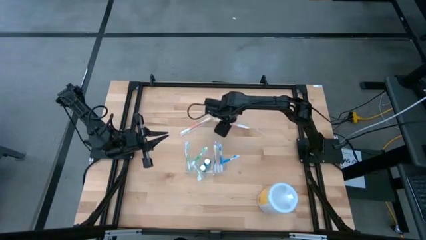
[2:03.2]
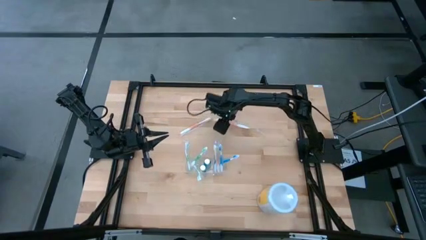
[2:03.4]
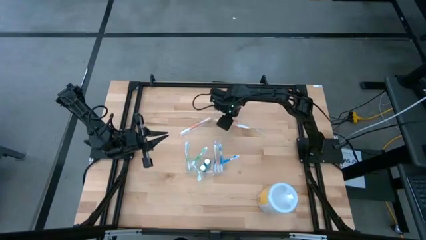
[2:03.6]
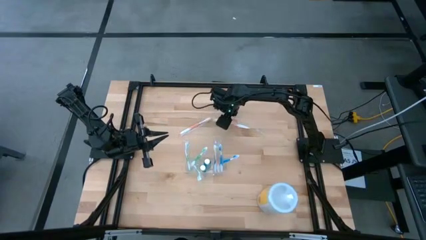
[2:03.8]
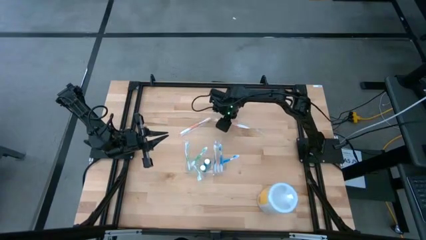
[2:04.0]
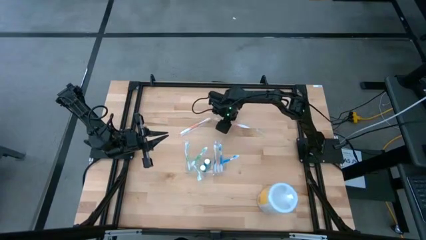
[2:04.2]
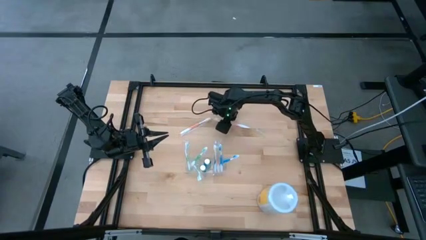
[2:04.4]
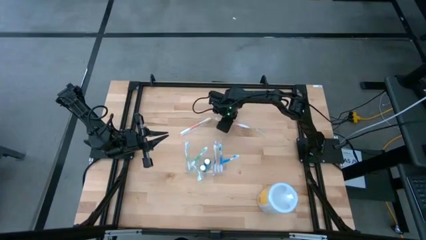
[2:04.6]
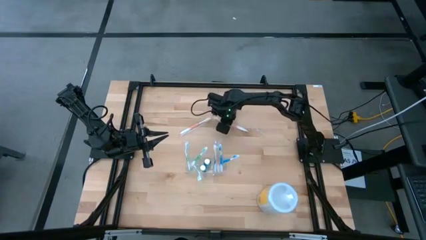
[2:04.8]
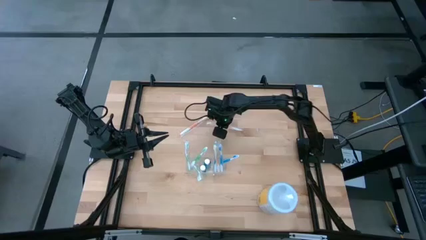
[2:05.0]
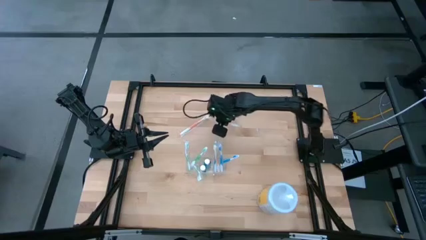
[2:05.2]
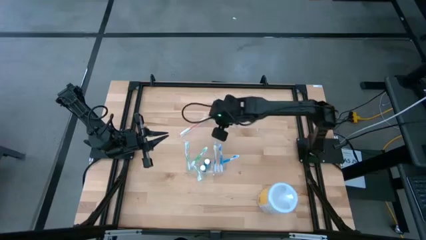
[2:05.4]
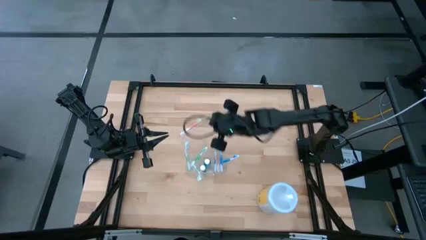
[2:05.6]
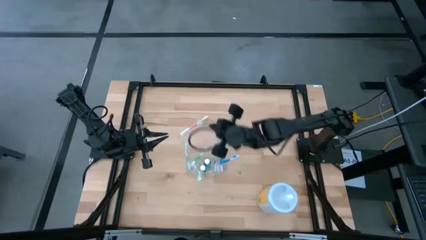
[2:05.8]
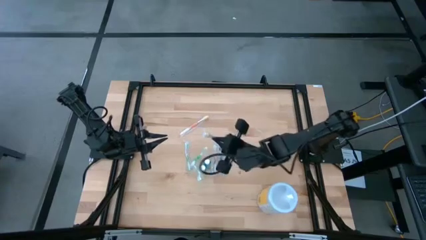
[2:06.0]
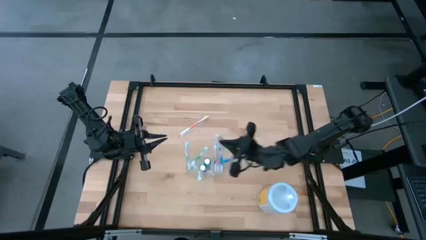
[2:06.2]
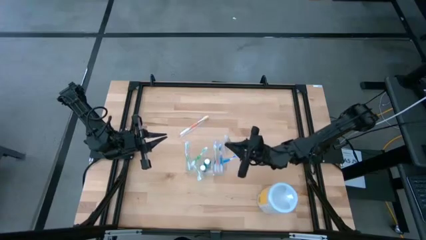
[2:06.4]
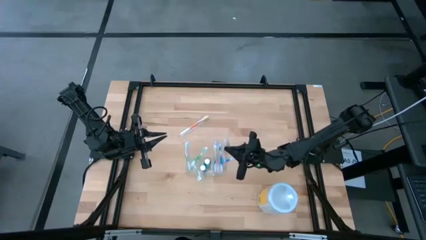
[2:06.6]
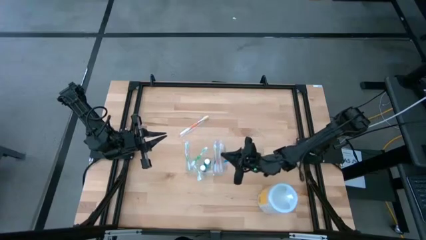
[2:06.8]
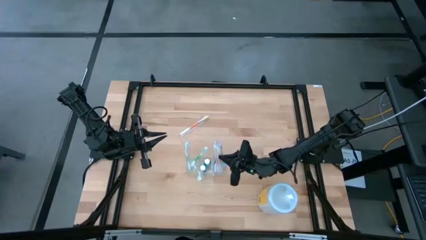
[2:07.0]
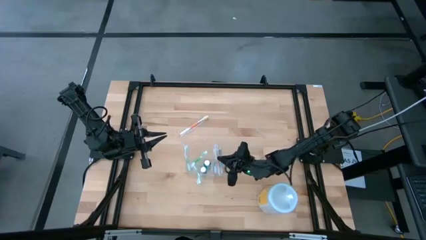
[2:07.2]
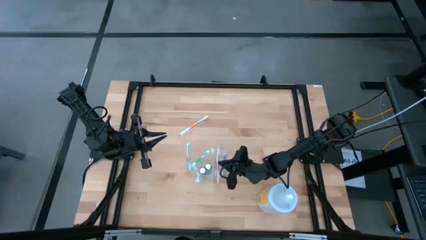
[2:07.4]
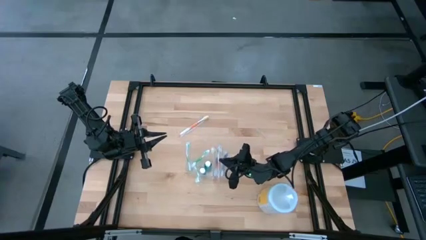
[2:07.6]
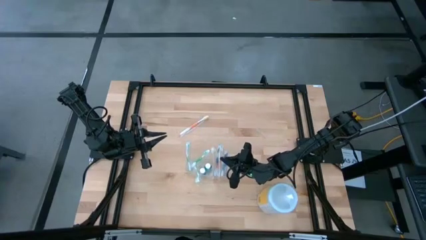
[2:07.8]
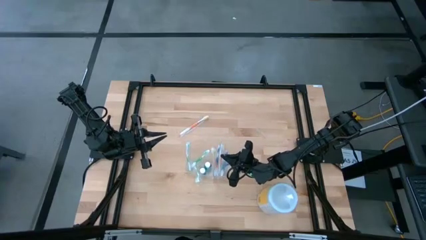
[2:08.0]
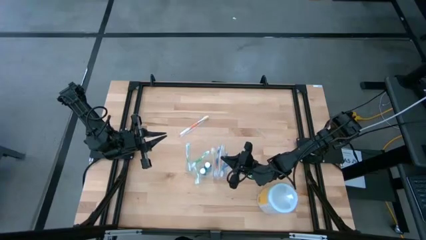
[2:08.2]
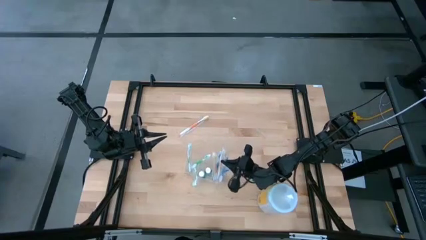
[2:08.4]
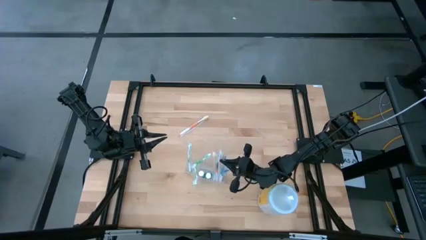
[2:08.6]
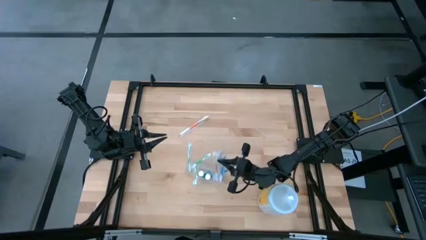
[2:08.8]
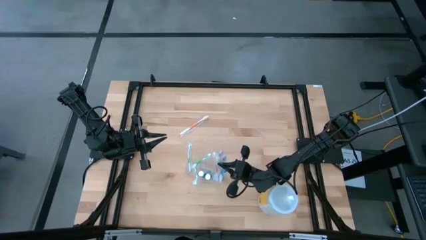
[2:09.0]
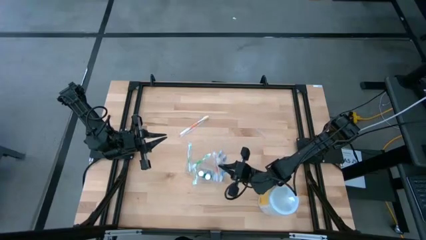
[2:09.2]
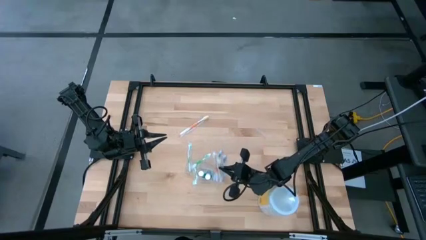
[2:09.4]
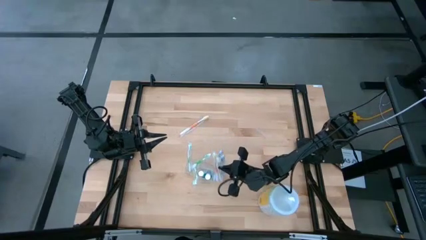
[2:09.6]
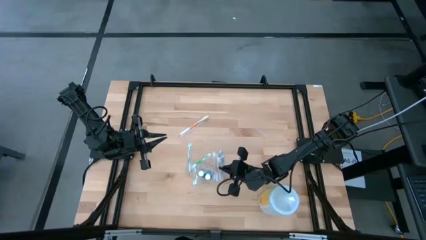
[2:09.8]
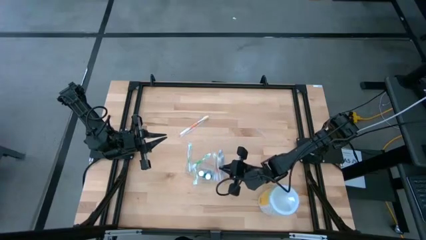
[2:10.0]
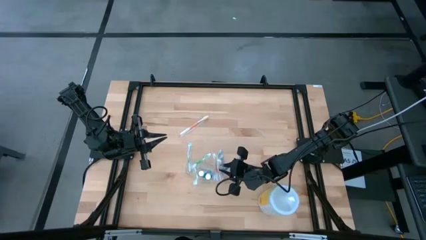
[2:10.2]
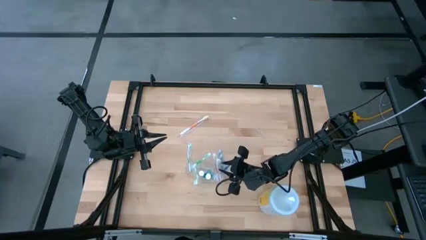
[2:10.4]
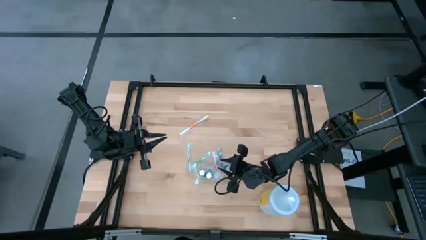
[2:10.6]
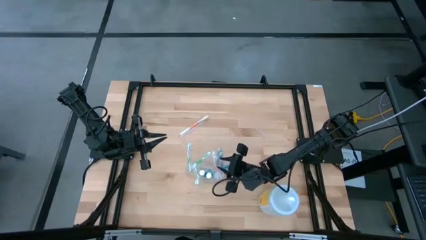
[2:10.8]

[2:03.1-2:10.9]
Task: Pick & Place toothbrushing station
Put the orange toothbrush into the transparent organizer

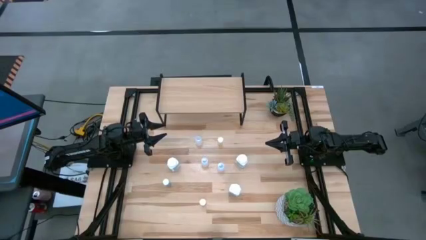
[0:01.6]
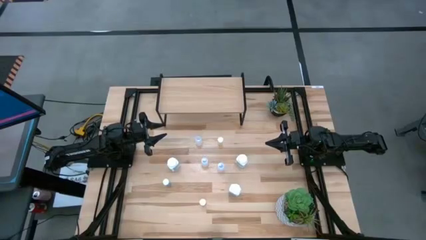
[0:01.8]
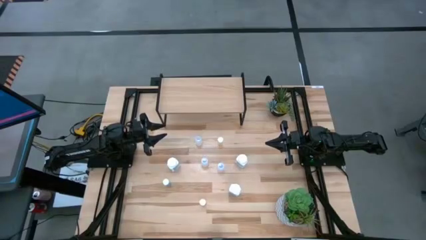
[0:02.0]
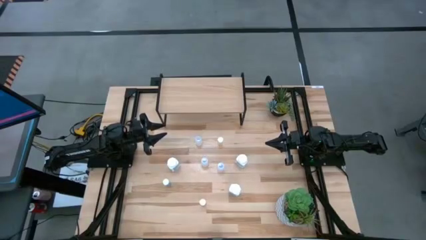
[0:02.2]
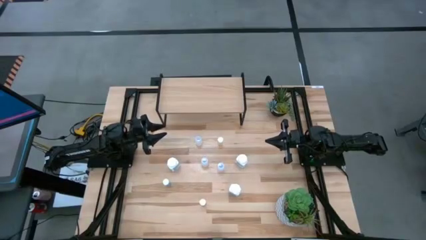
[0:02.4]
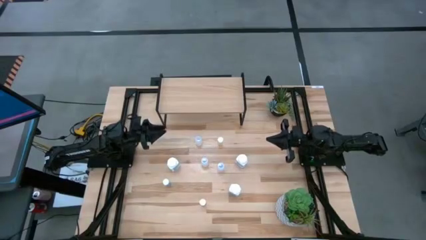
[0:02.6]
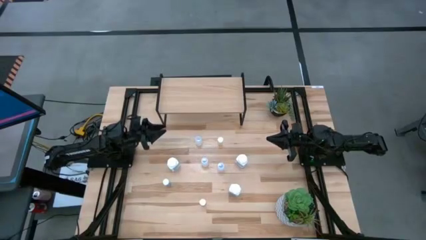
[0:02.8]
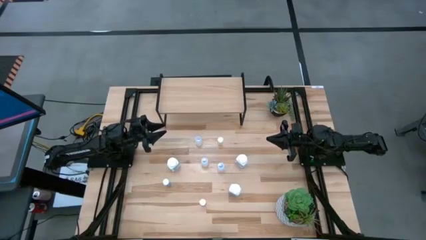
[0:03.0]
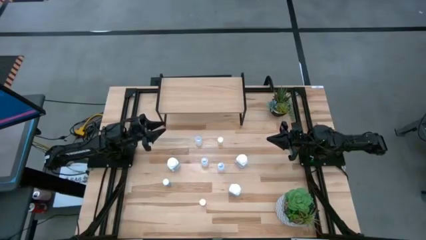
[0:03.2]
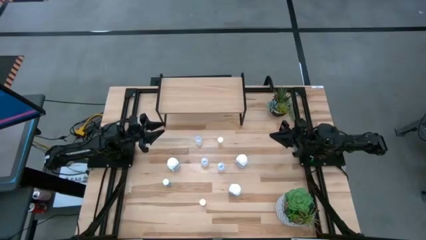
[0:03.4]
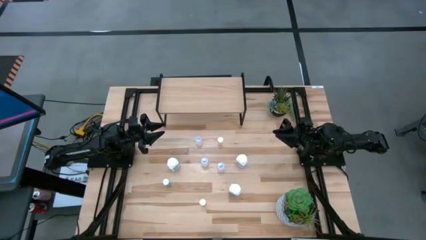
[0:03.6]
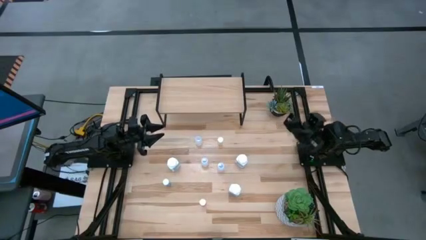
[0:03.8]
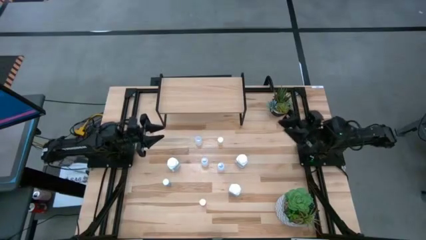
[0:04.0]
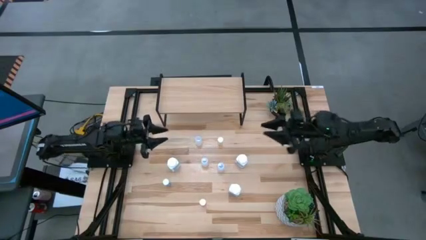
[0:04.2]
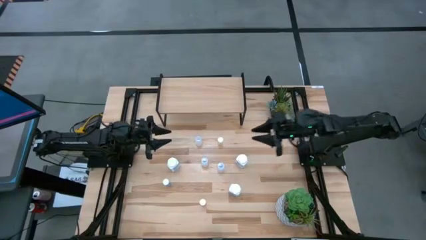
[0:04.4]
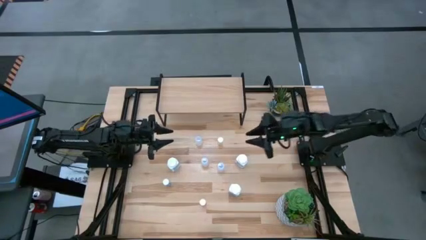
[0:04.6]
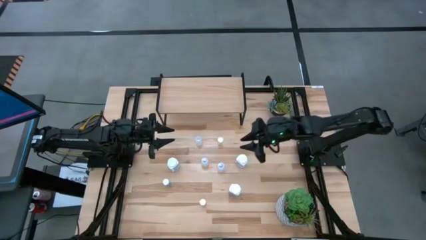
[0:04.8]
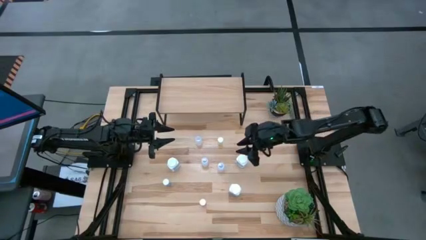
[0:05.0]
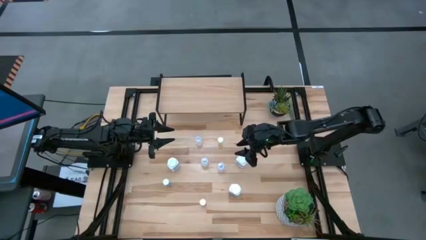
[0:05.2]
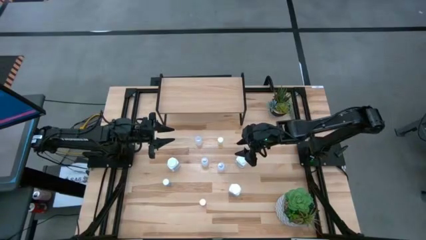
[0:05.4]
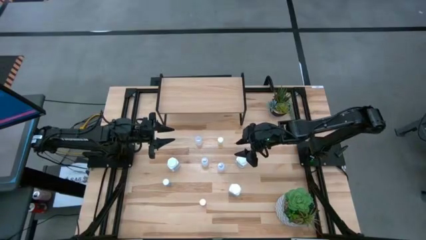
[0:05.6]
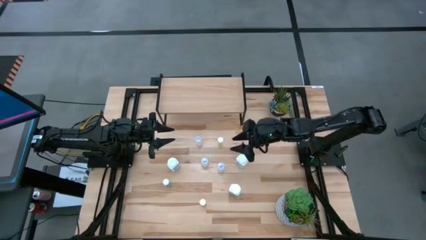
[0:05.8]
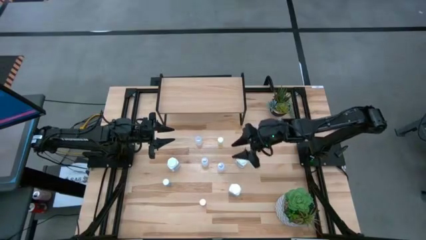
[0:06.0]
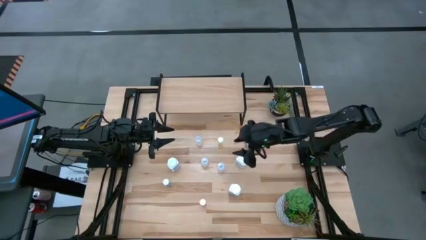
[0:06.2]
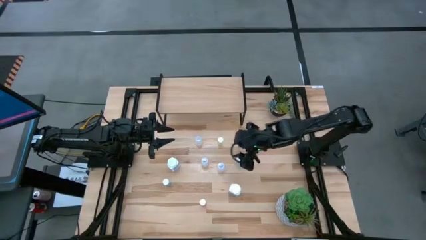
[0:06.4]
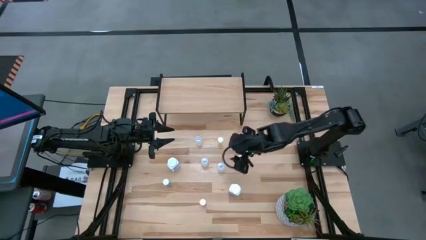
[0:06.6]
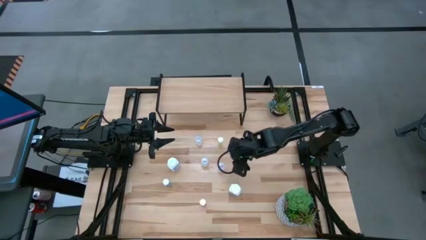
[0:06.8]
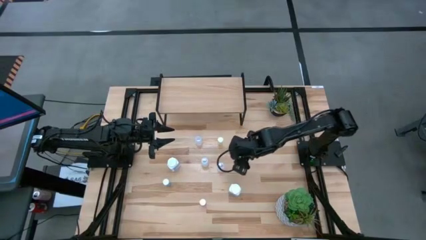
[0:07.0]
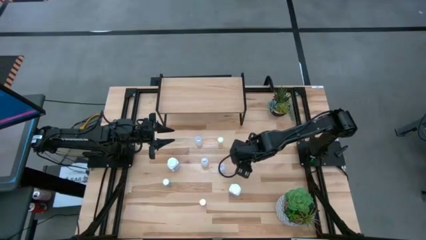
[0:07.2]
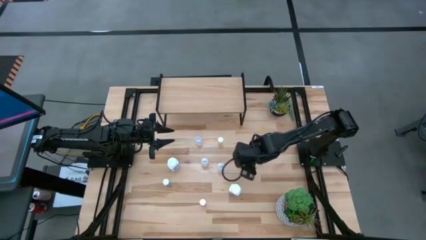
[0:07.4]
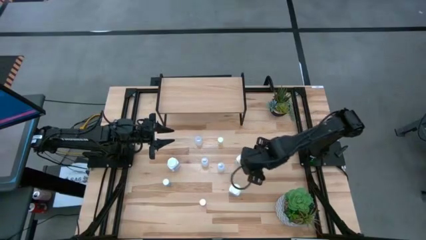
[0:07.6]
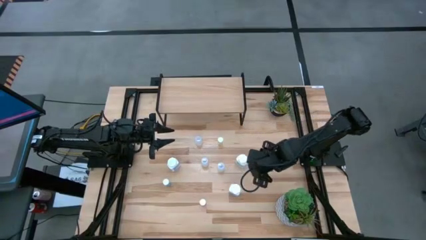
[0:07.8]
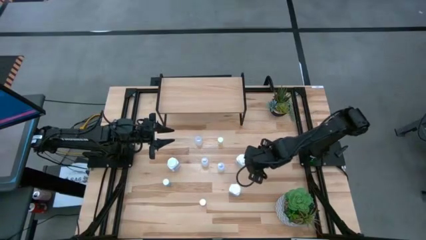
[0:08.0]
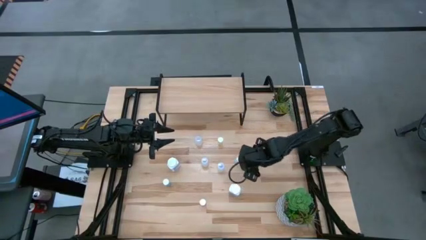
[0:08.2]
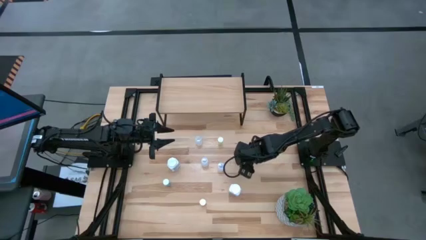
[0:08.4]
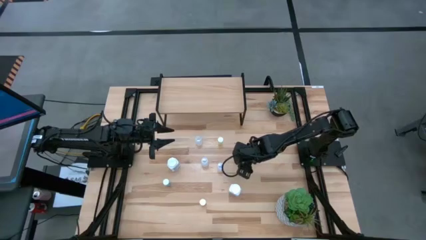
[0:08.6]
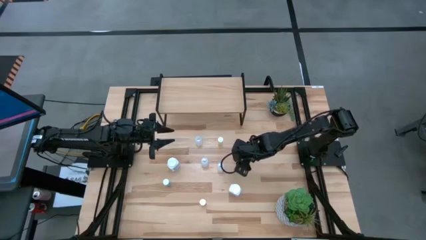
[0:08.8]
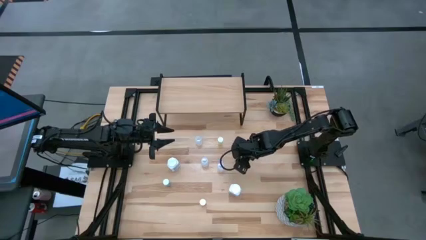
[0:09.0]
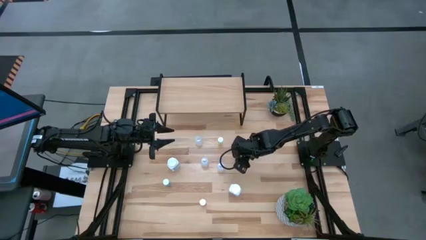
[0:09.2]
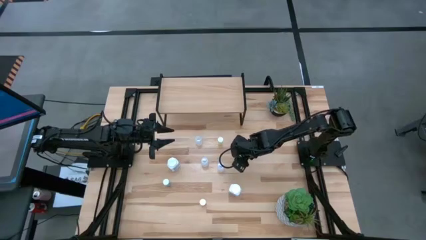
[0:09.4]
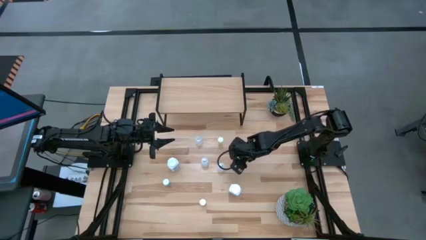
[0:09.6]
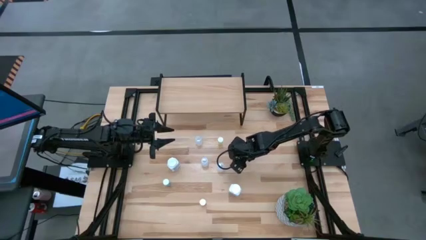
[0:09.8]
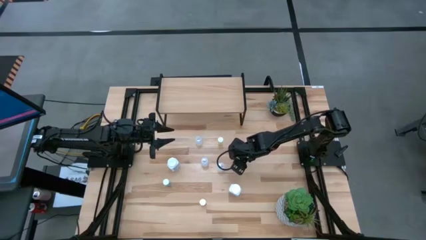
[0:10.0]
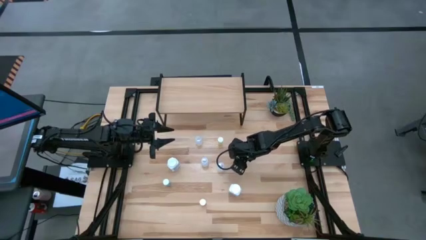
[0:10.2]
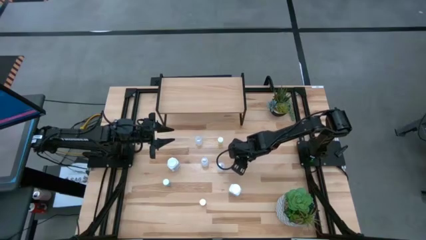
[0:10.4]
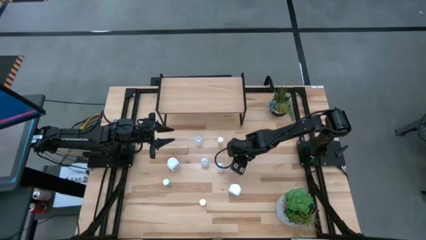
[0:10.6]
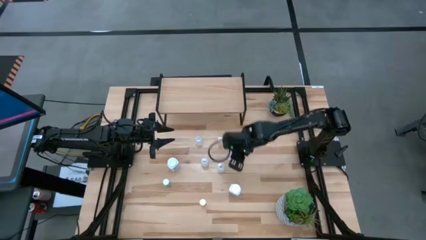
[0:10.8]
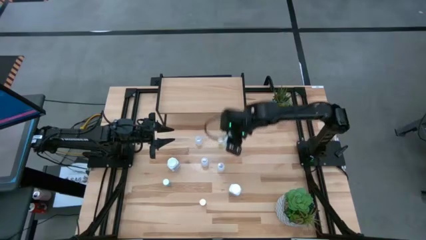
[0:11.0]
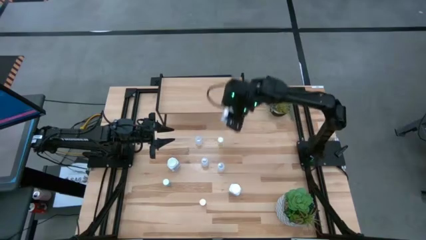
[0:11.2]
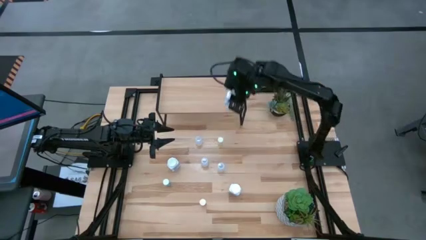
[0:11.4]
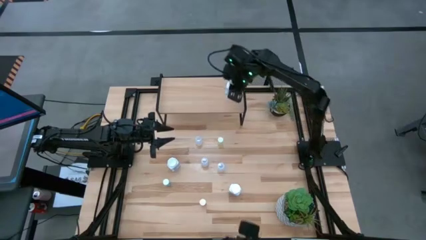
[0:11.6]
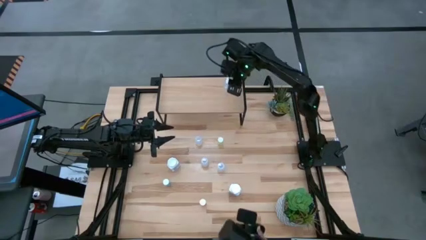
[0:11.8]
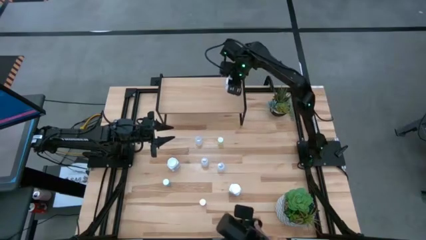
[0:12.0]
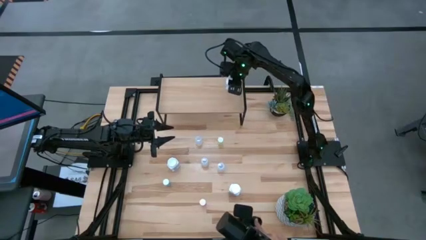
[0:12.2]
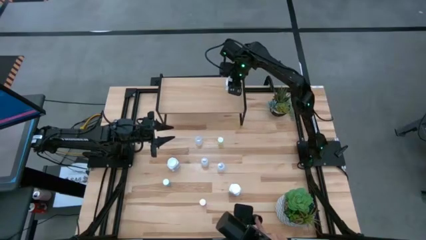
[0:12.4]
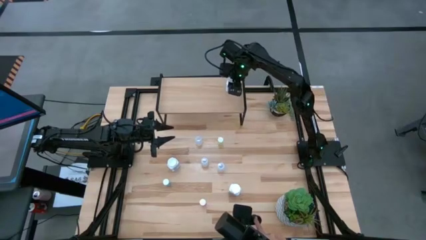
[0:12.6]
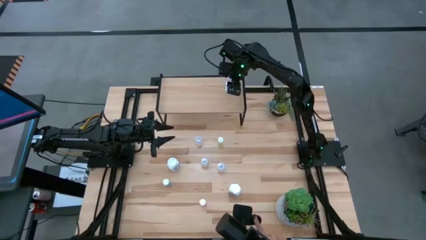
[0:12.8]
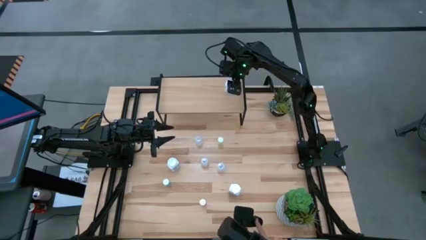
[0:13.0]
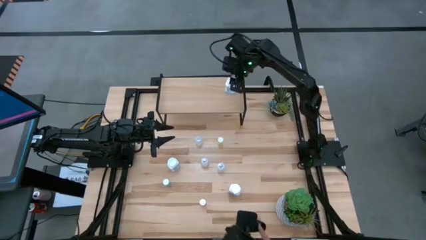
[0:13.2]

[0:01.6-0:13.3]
Task: Pick and place medicine bottles onto shelf by color
Put the top right big white pill bottle on the shelf
